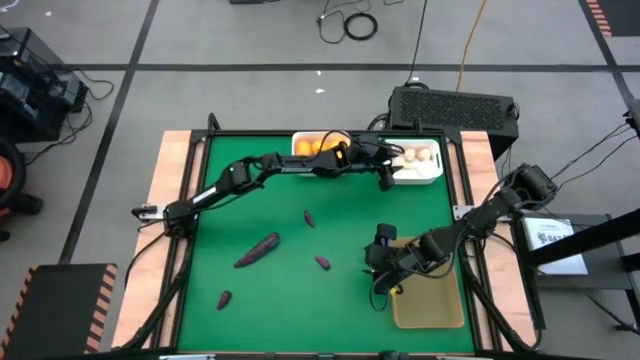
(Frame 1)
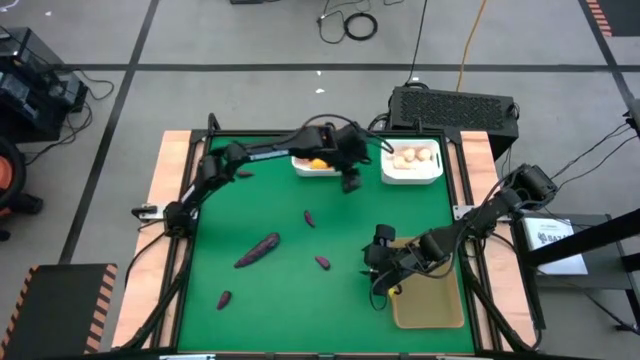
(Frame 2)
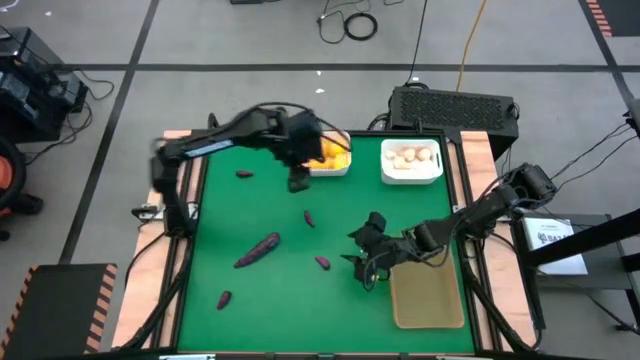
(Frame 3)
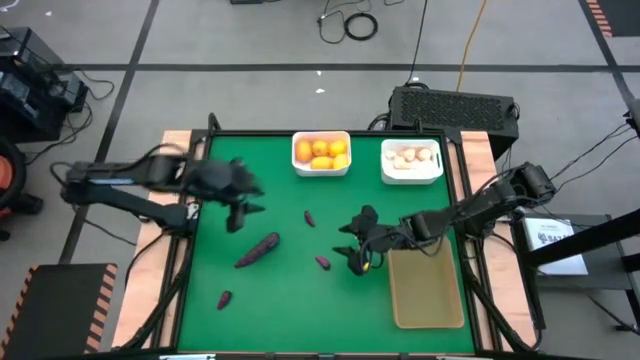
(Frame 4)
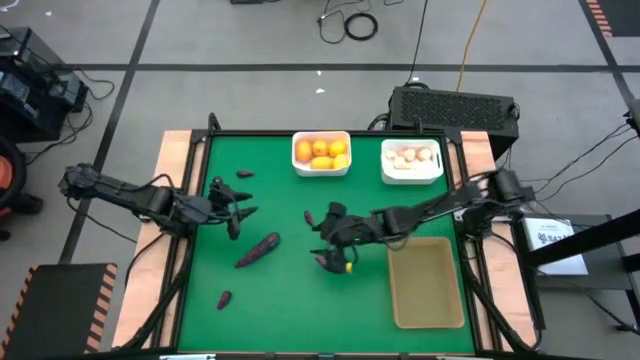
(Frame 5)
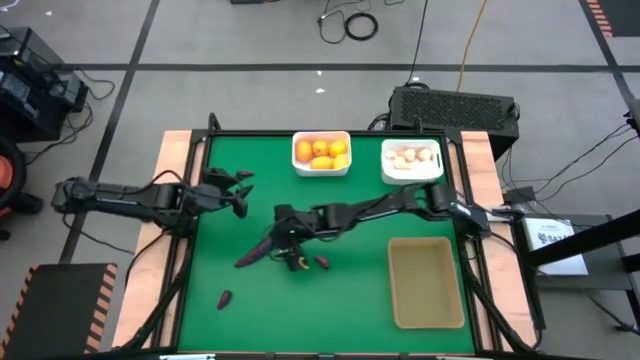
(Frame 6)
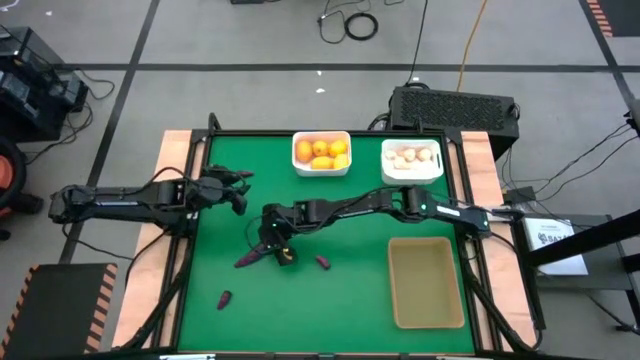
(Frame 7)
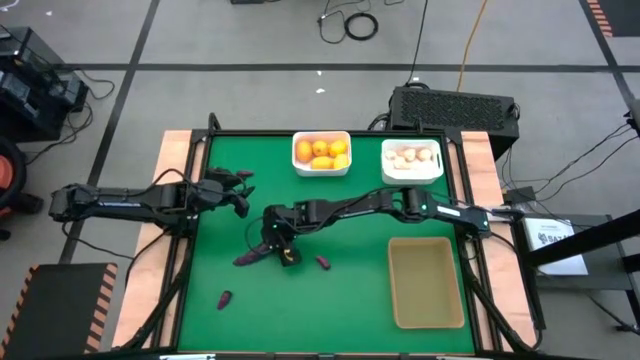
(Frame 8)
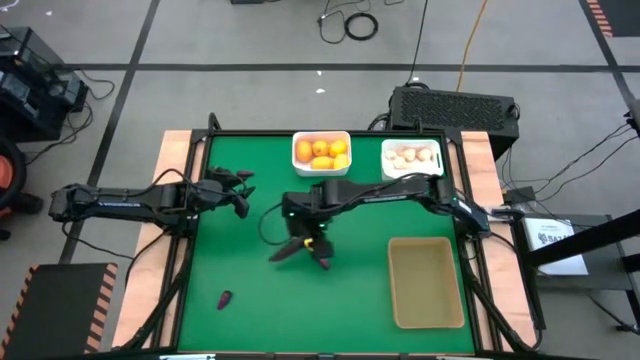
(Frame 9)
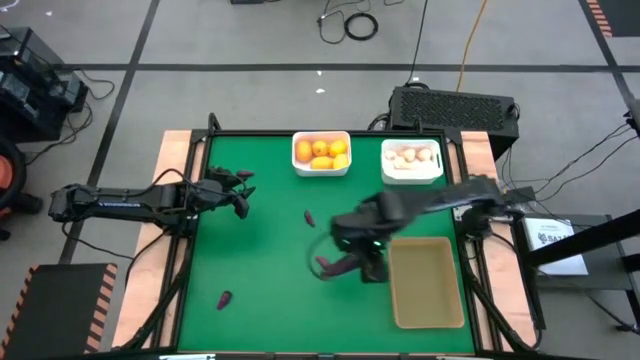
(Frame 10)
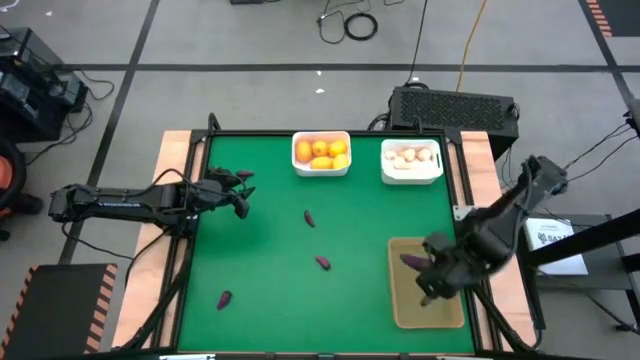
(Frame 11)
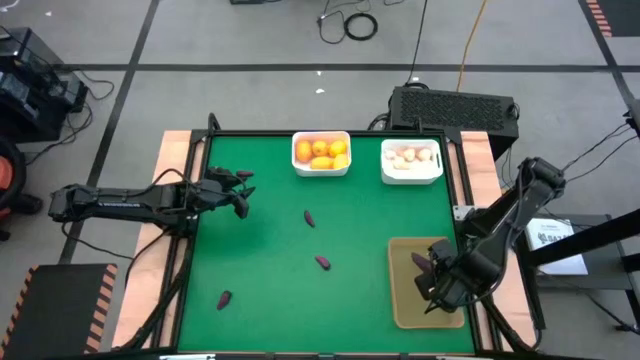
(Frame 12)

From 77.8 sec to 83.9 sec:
Task: Sort produce into baskets
Put the eggplant into the light orange bin

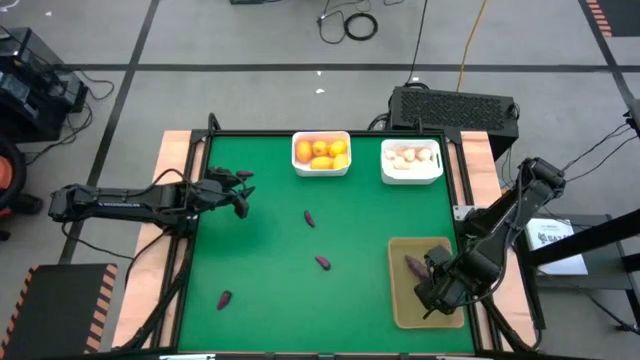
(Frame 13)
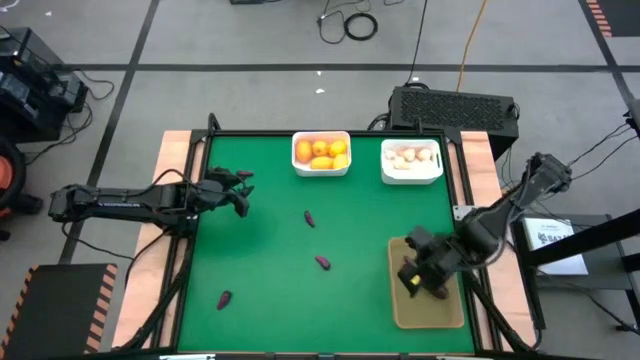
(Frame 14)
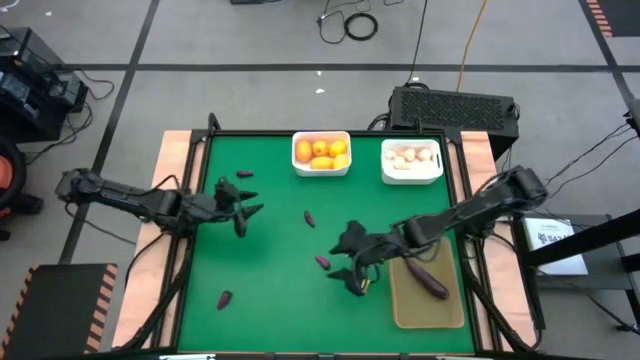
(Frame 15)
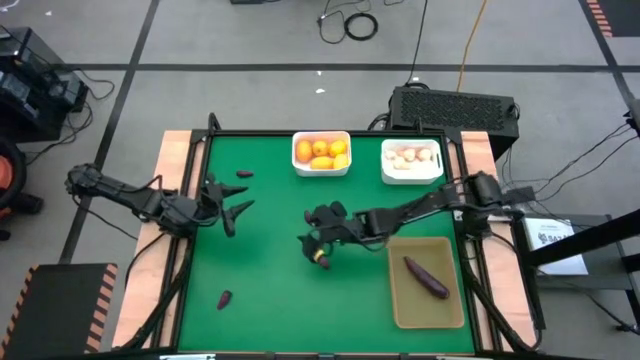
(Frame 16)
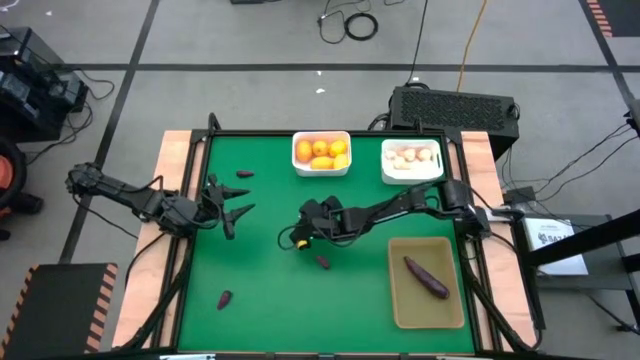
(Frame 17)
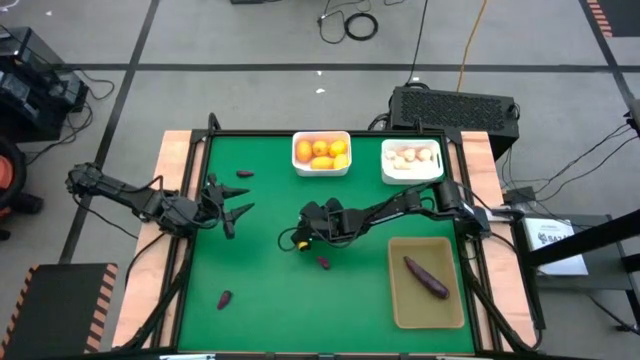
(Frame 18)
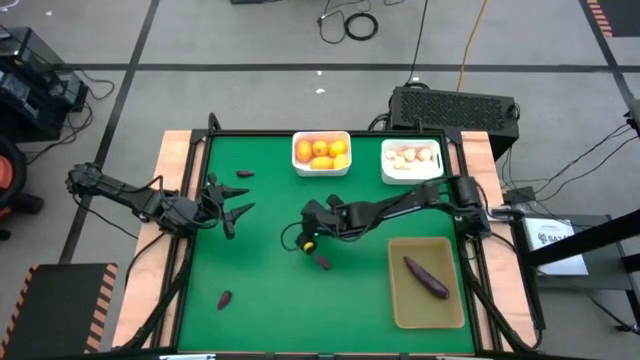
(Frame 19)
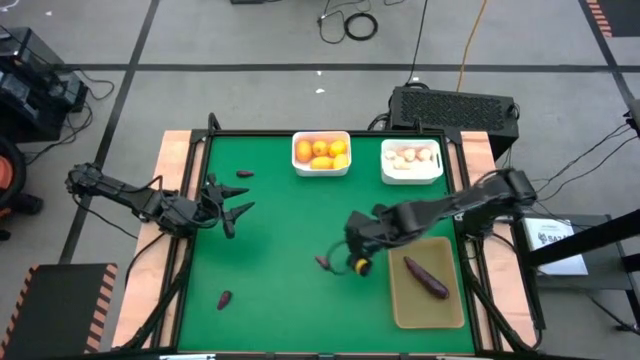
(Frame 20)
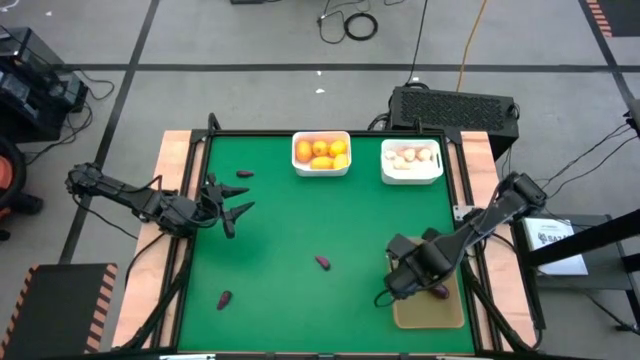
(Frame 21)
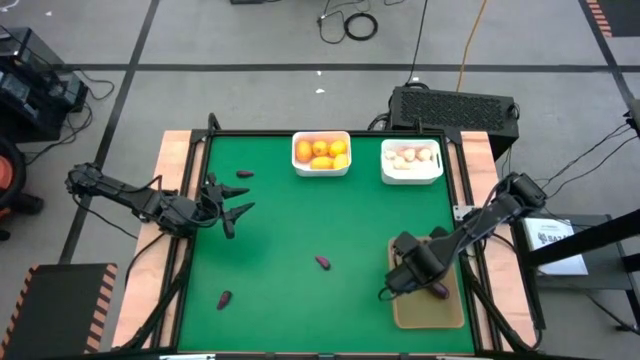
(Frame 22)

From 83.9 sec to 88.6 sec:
Put the eggplant into the light orange bin

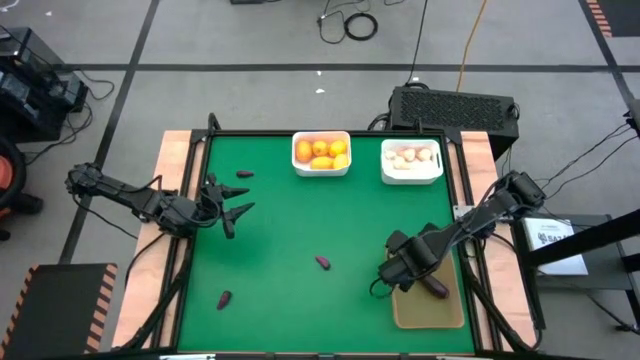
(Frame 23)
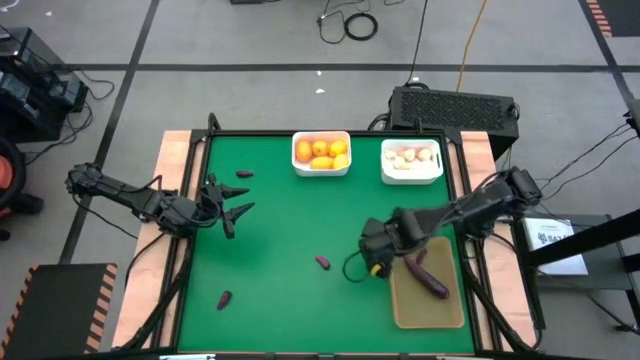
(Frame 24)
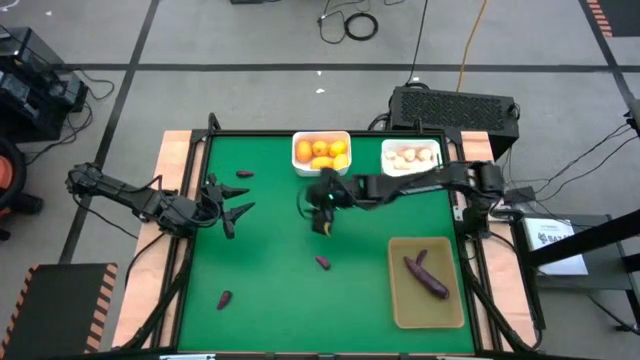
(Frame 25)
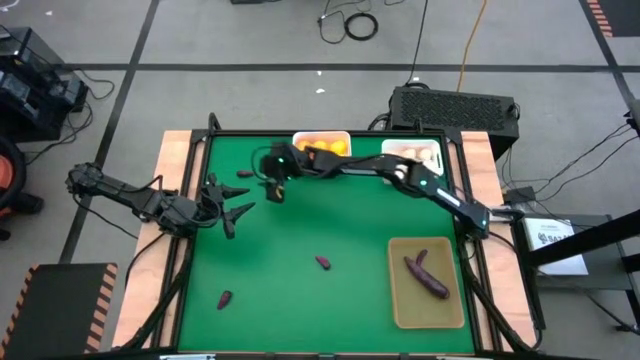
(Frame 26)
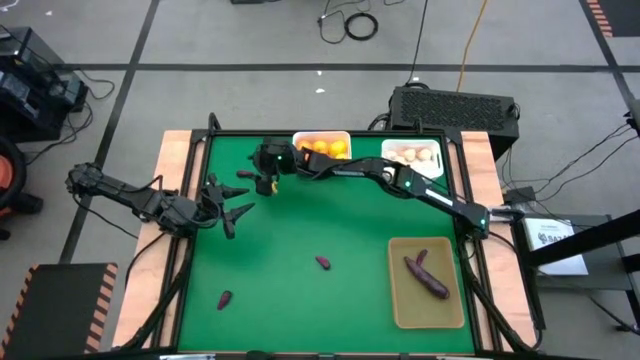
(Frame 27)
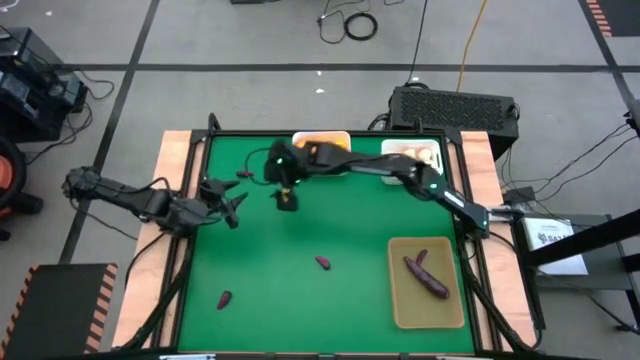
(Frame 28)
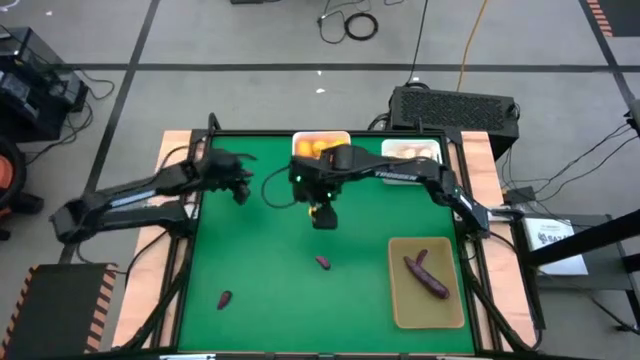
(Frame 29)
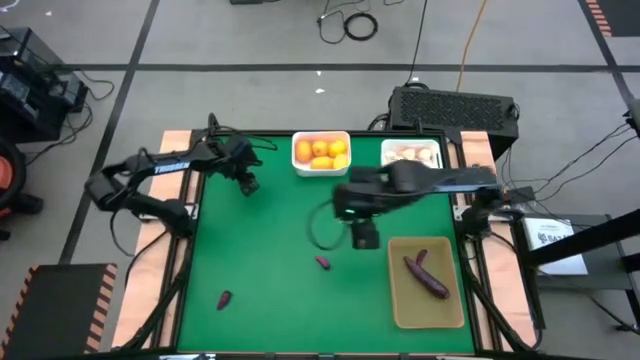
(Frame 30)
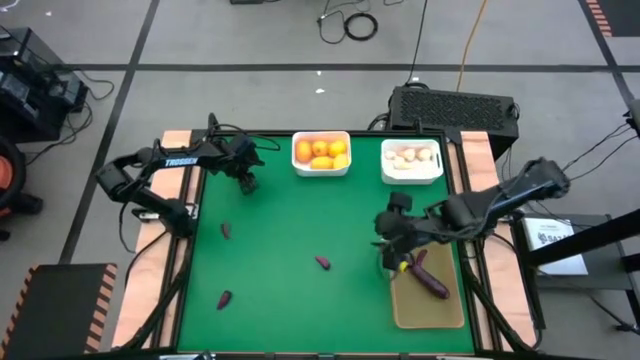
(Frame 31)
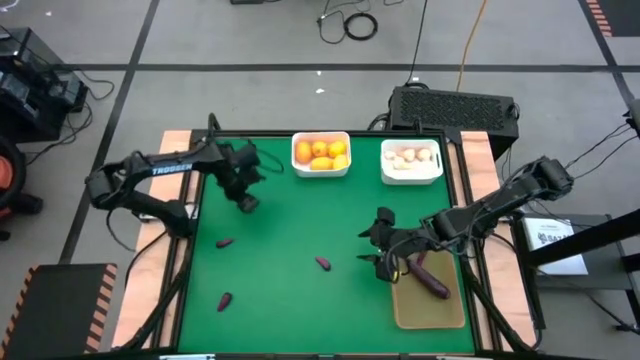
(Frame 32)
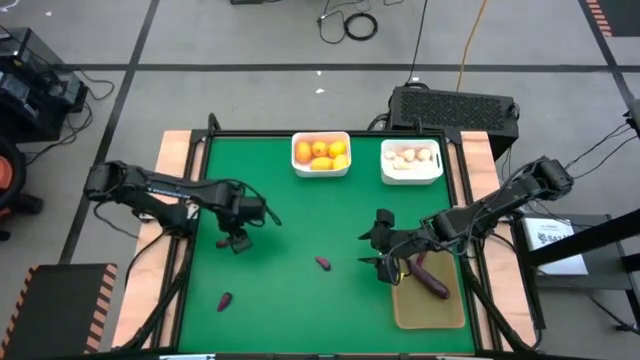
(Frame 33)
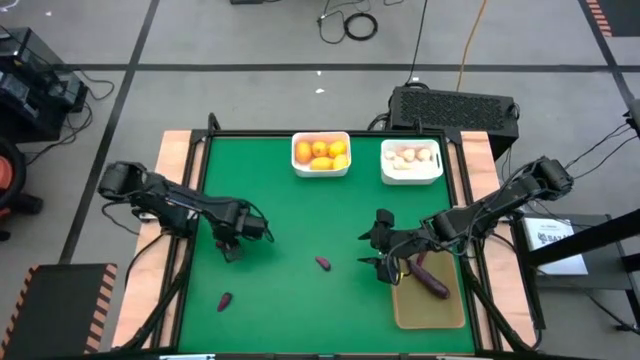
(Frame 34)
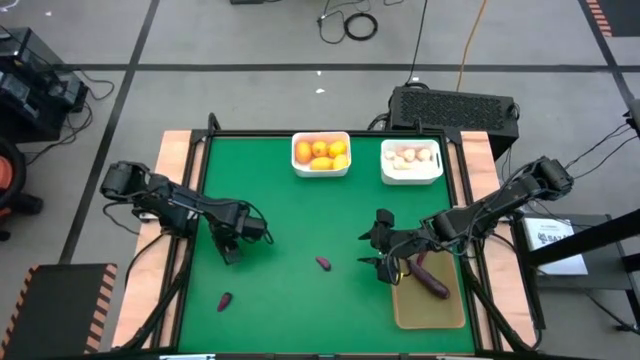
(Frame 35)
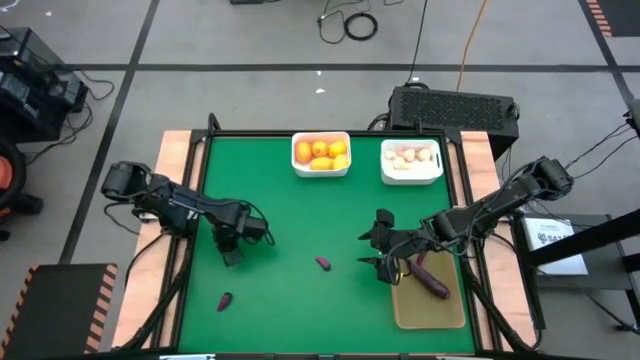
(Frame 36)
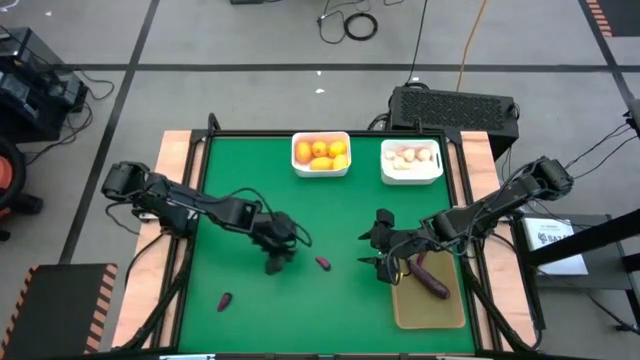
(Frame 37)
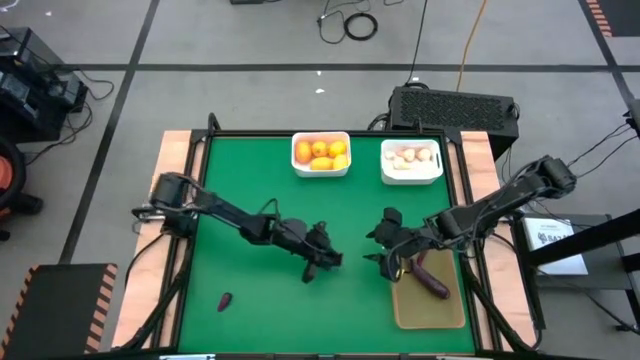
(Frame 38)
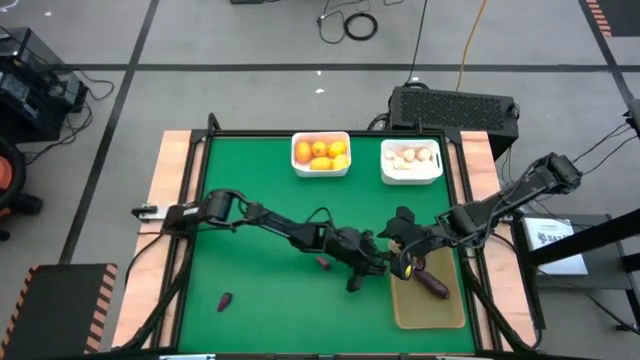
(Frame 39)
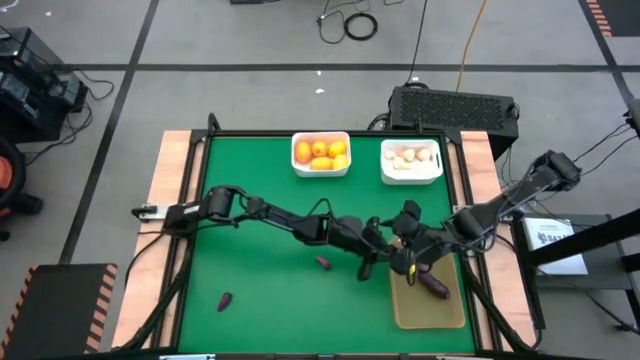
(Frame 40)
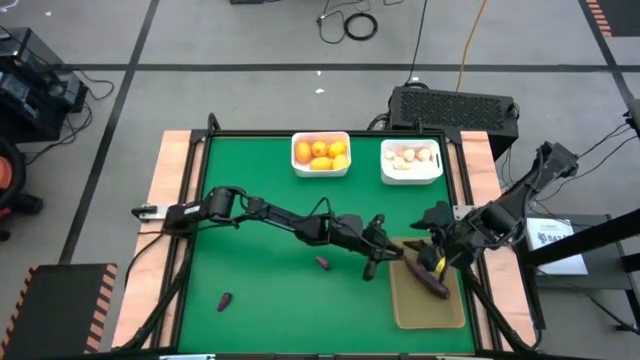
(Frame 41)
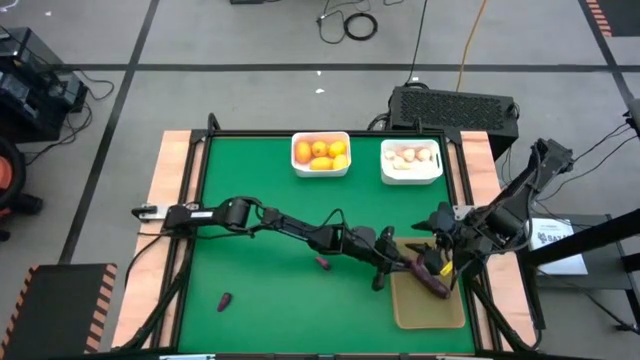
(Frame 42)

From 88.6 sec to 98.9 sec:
Put the eggplant into the light orange bin
